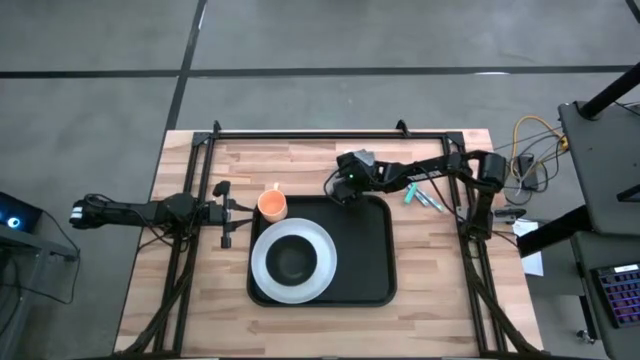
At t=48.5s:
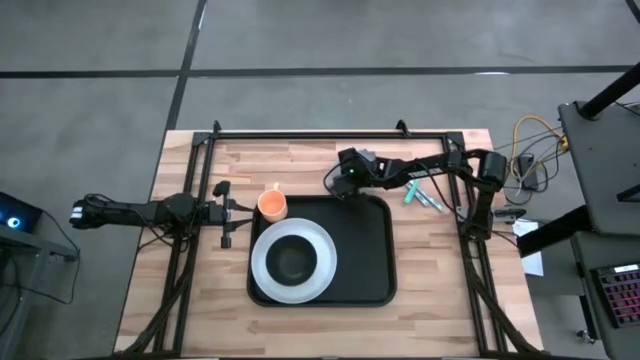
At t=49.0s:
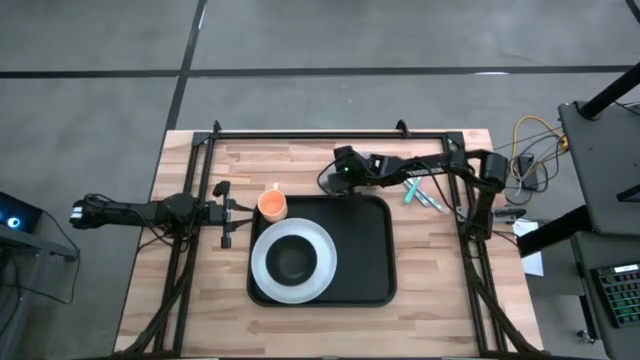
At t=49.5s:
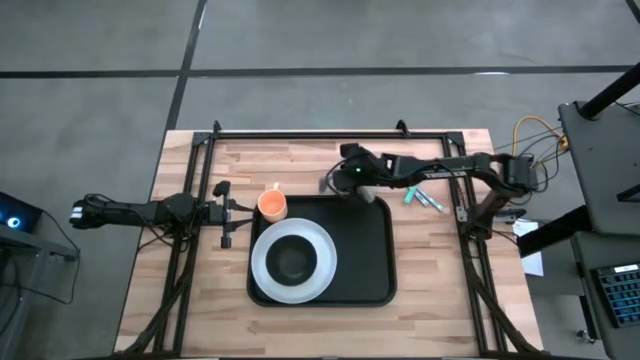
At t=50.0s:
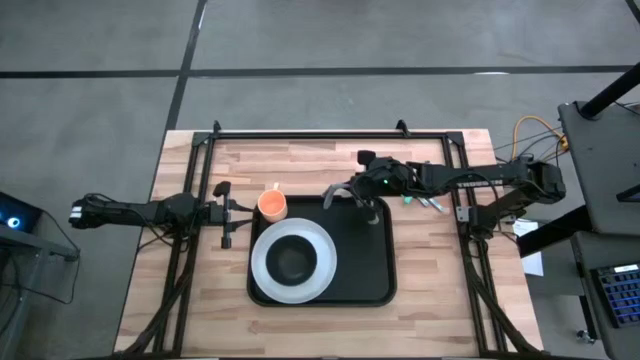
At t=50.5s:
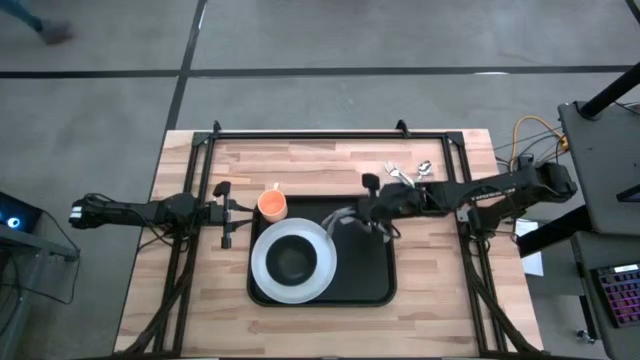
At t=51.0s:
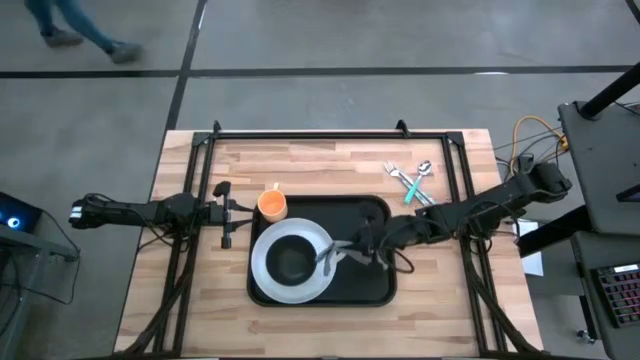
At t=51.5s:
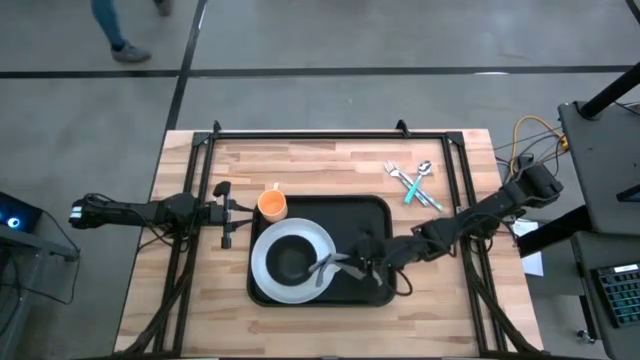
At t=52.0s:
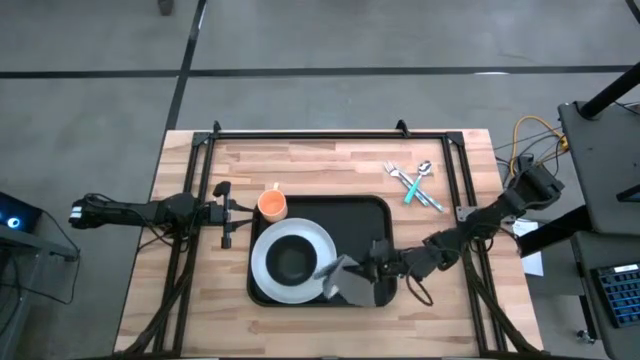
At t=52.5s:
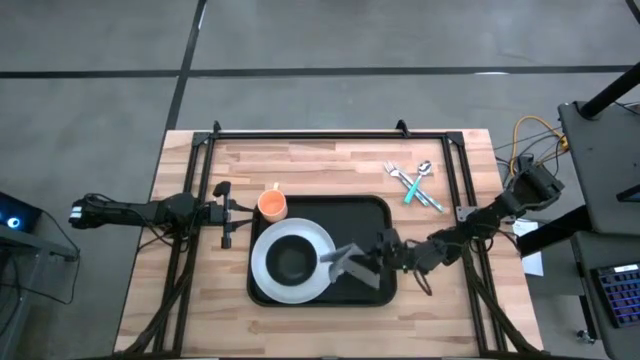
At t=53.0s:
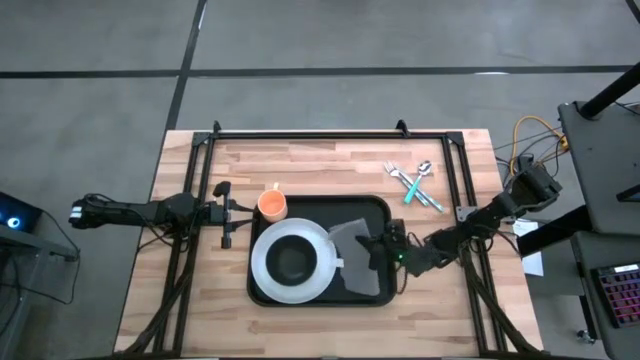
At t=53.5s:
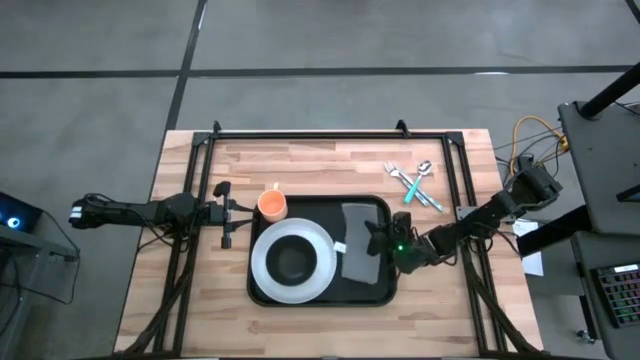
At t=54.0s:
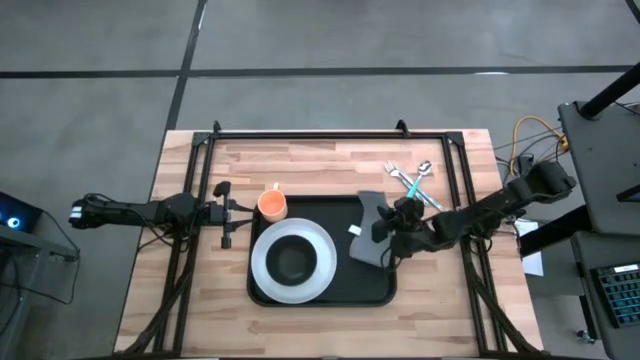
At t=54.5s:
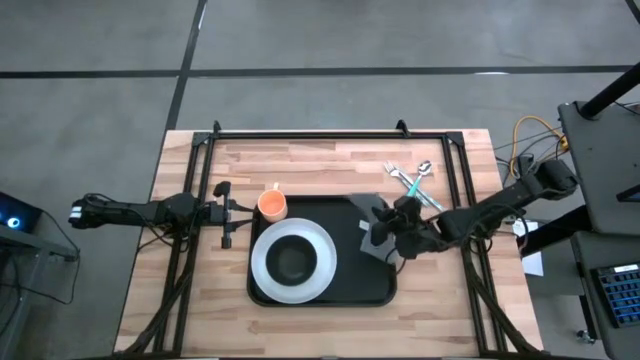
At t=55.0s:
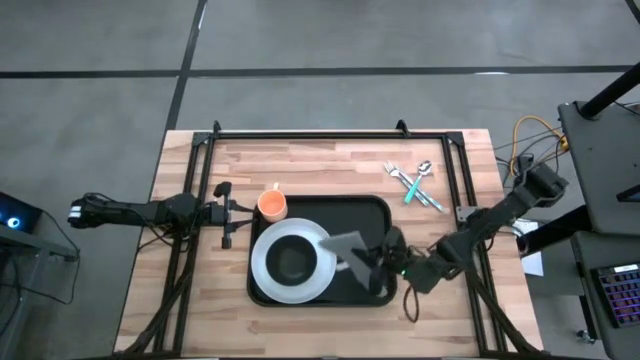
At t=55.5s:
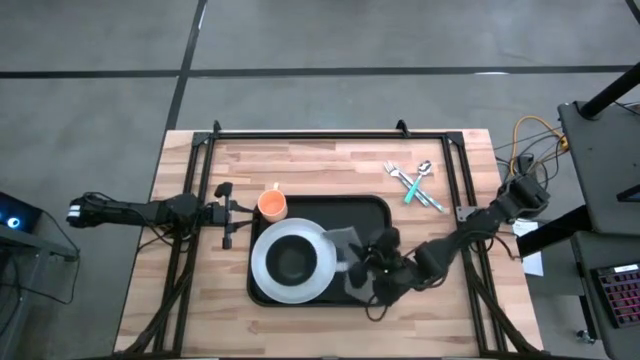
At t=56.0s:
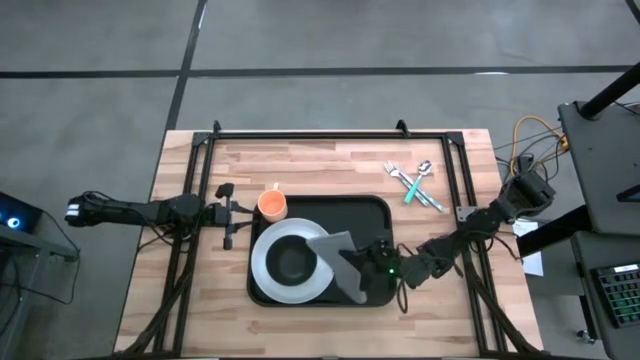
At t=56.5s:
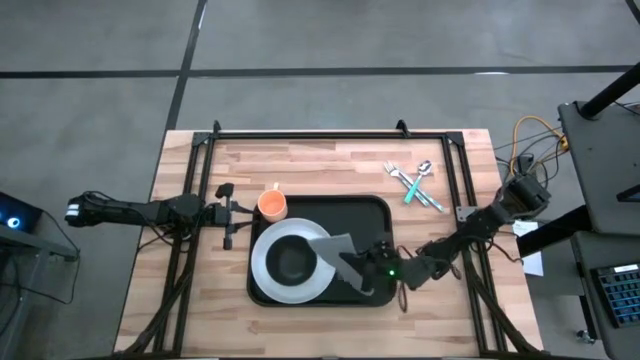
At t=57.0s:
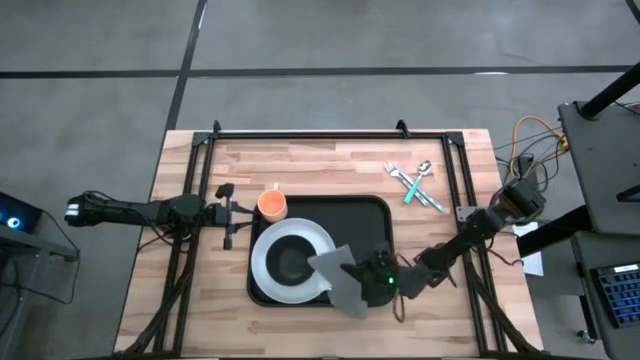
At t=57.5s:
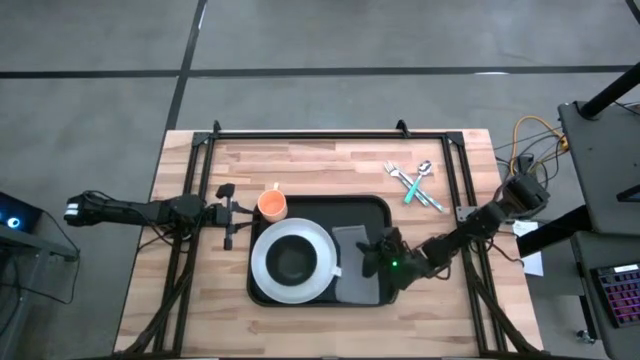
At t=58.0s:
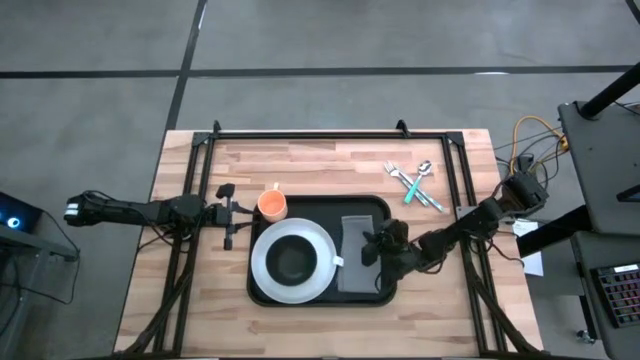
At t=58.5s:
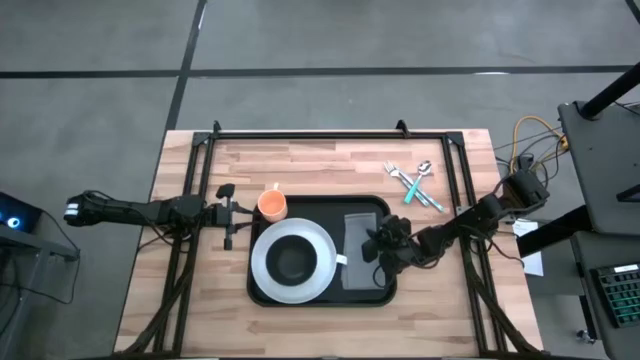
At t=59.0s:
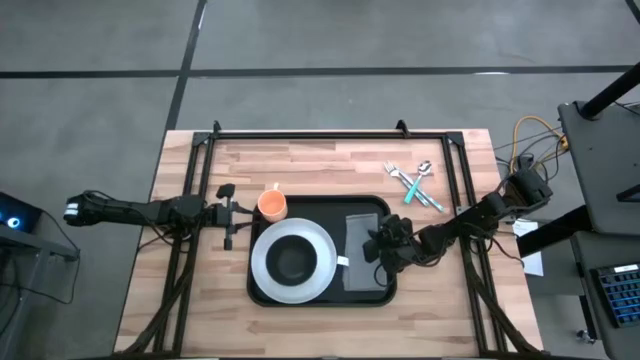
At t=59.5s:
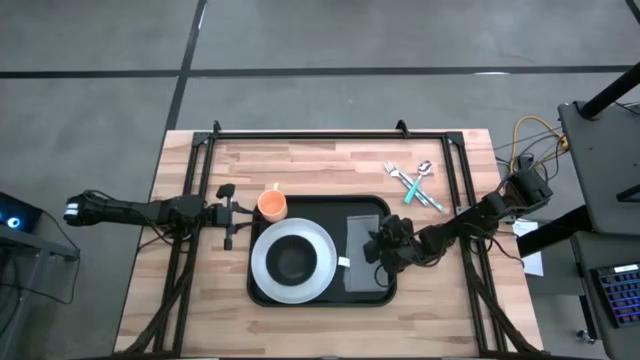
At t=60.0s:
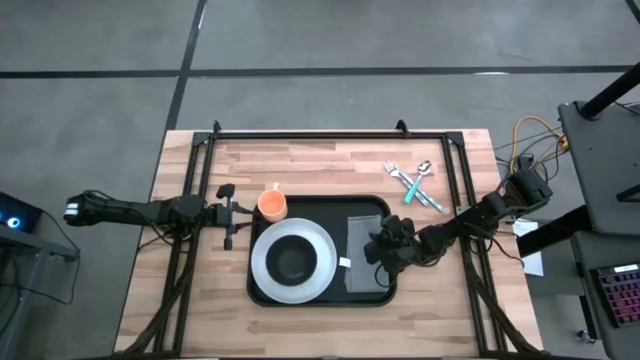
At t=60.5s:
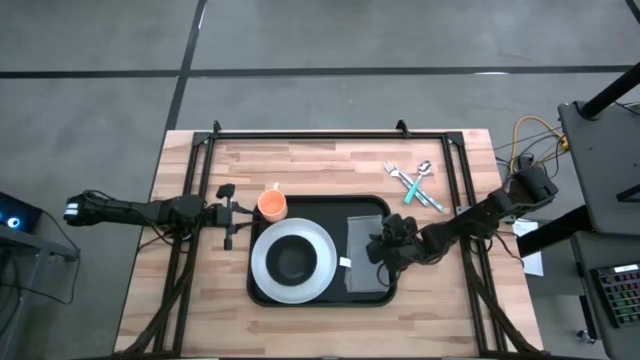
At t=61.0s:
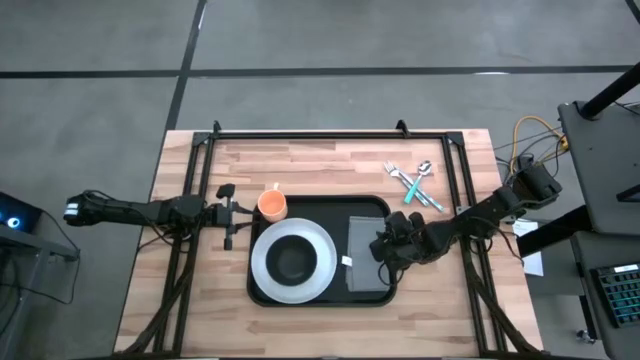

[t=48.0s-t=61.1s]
Task: Set up tray
Put the gray napkin on the right side of the black tray

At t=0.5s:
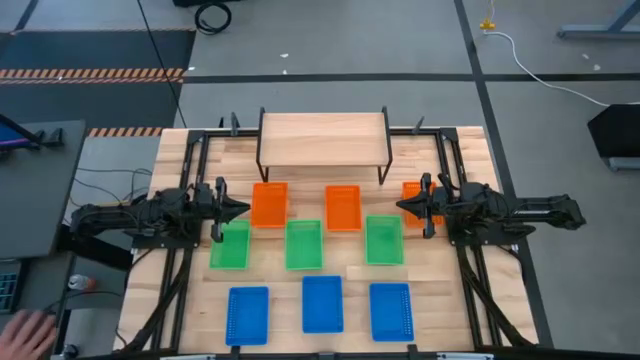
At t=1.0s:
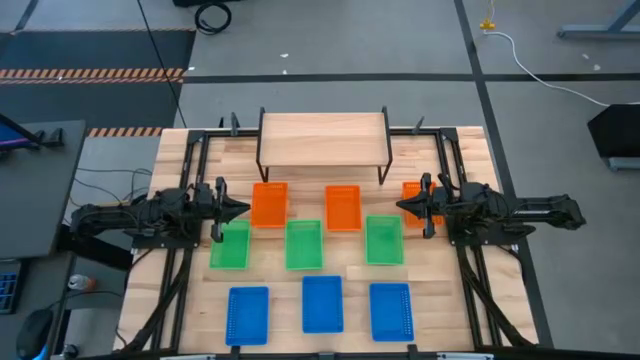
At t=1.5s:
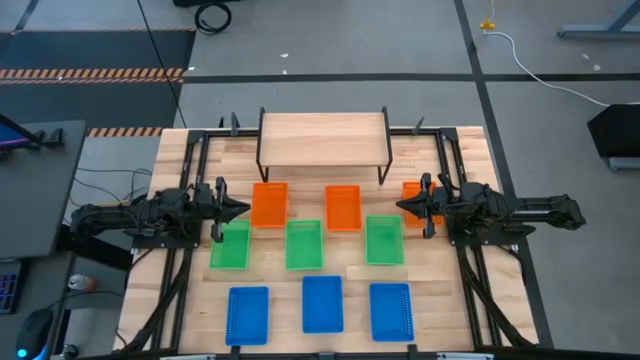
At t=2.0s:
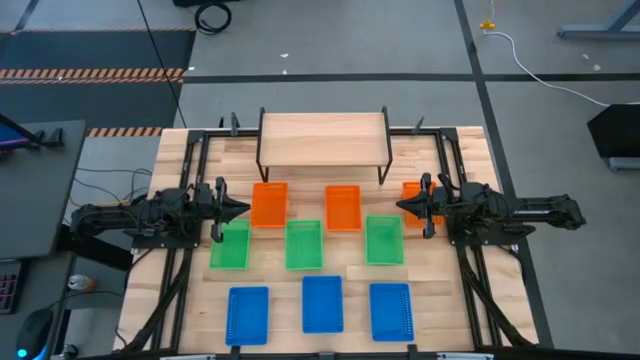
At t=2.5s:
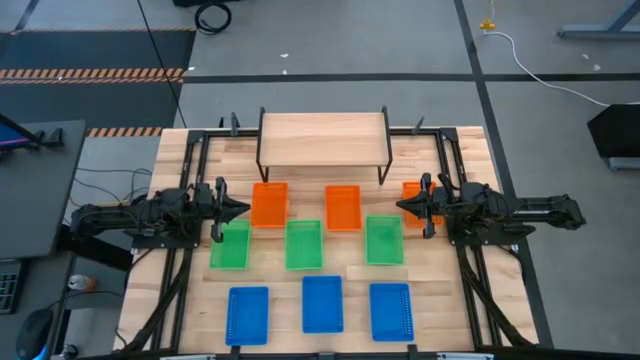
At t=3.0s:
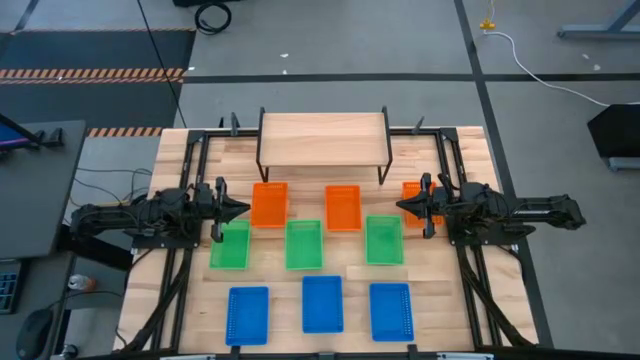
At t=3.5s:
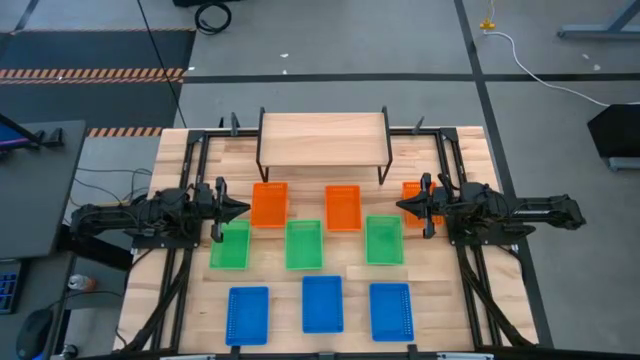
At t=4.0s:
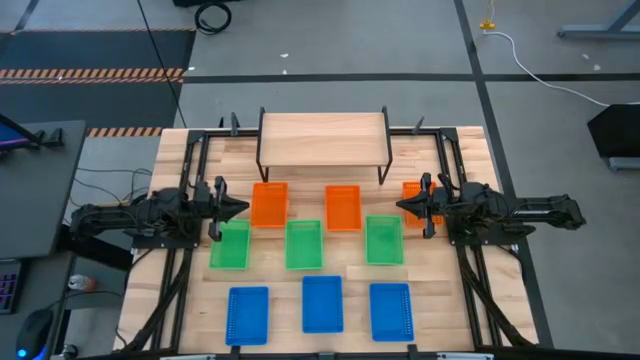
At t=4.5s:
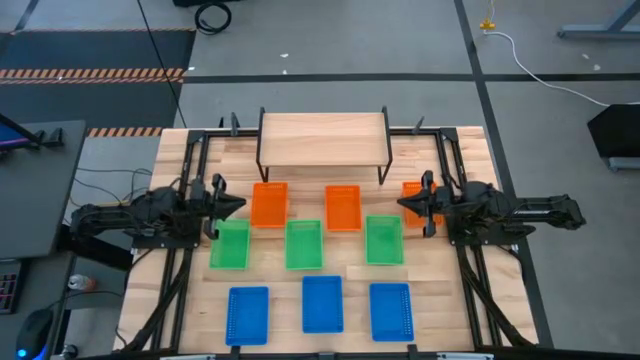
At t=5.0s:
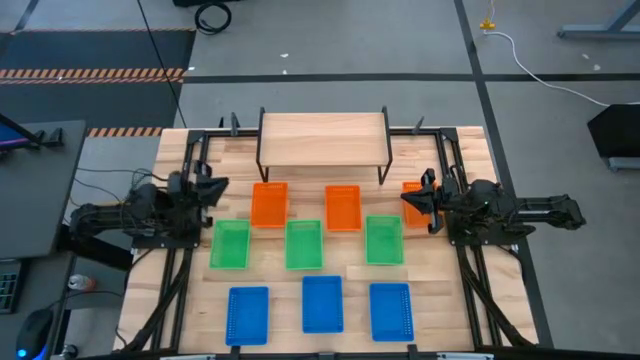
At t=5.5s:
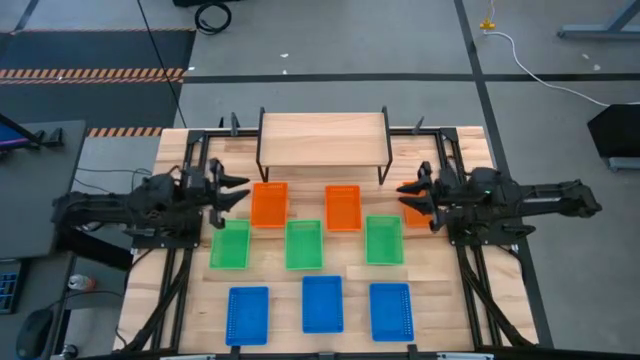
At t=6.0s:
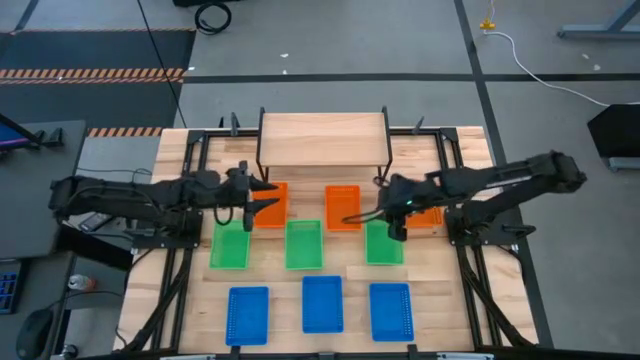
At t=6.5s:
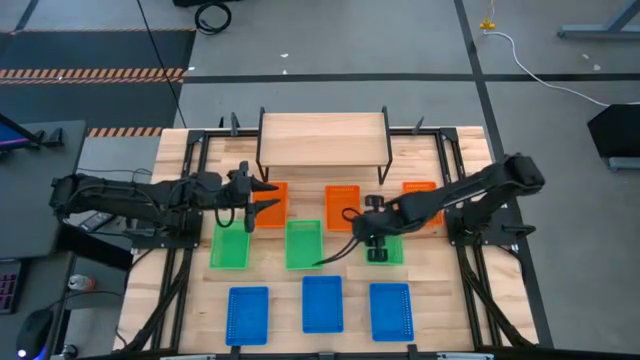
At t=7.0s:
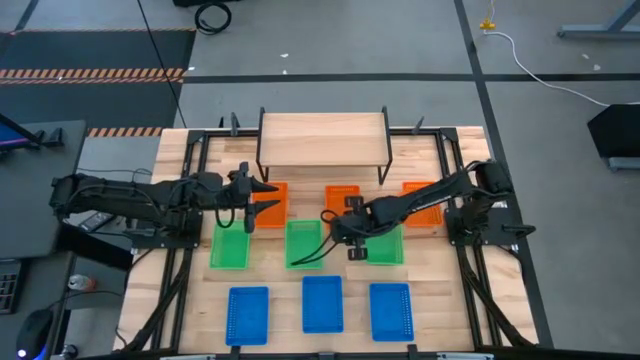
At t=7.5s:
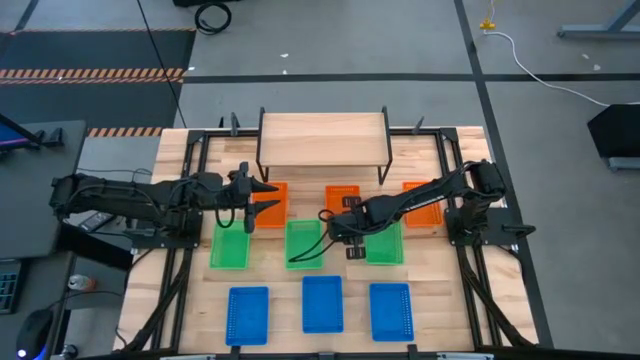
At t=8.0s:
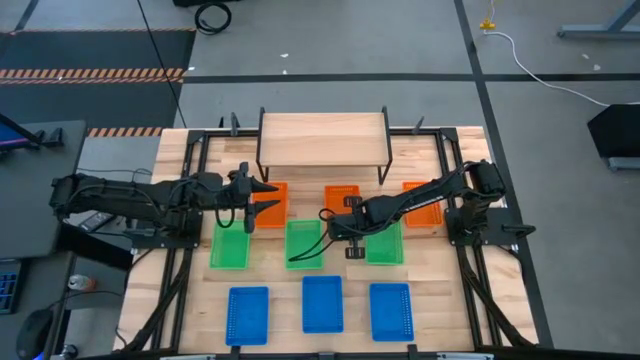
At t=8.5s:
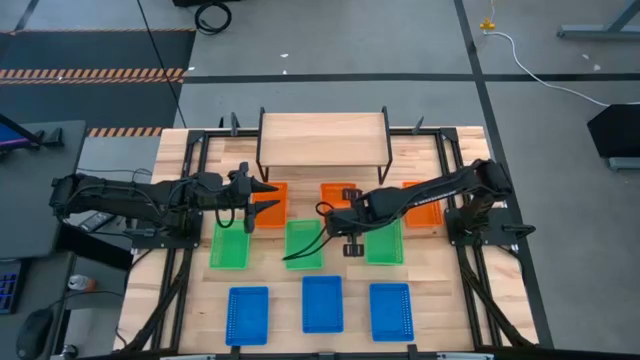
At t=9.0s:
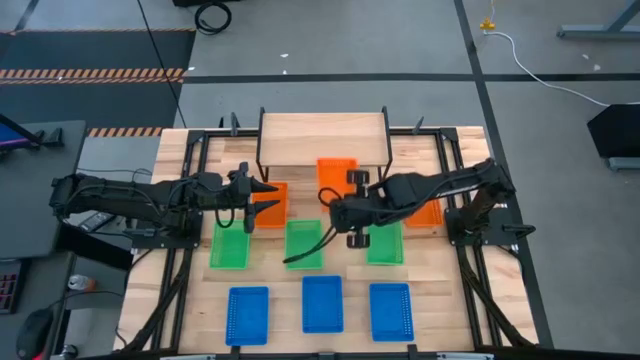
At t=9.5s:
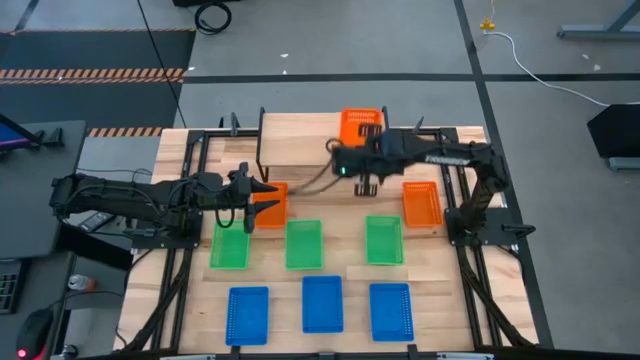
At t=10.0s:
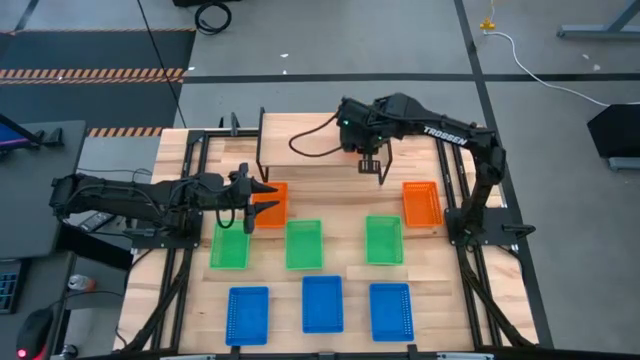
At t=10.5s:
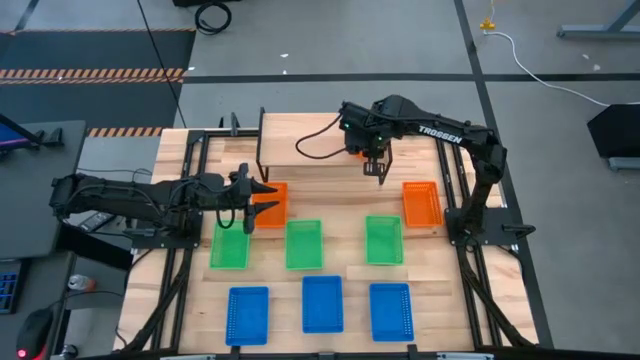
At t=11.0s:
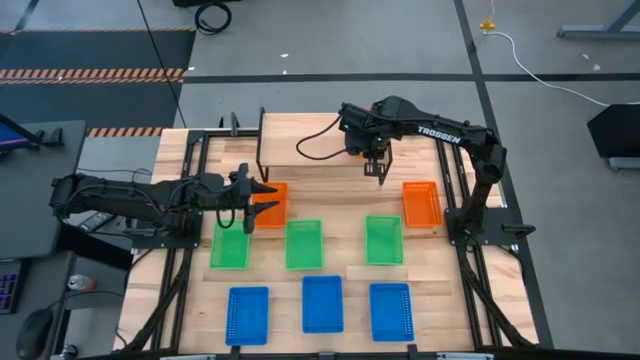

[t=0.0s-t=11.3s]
Task: Stack baskets on shelf by color
Put the middle orange bin on the shelf
